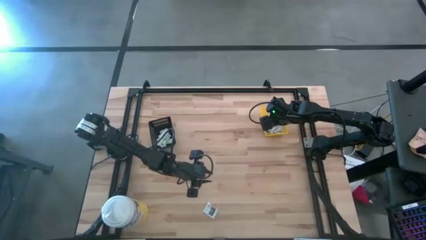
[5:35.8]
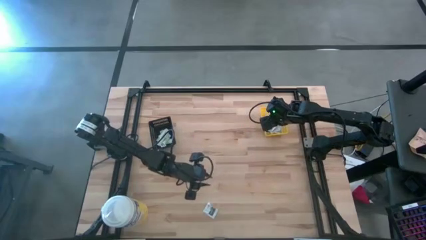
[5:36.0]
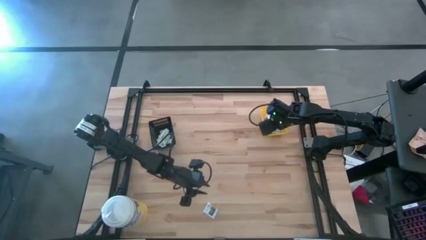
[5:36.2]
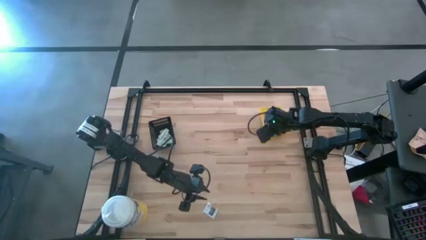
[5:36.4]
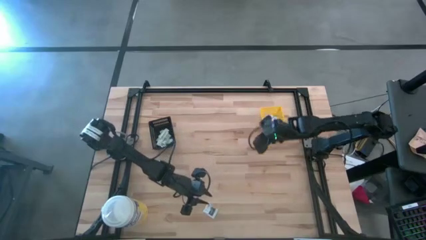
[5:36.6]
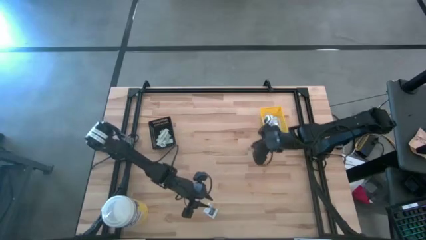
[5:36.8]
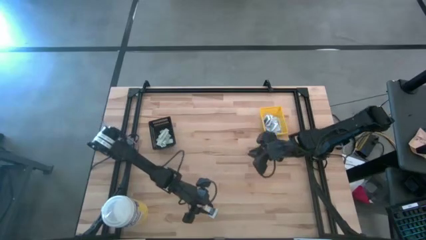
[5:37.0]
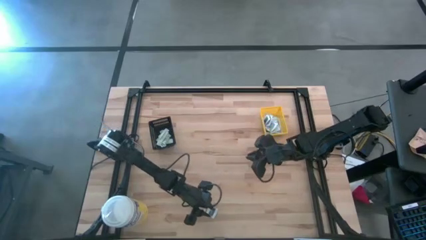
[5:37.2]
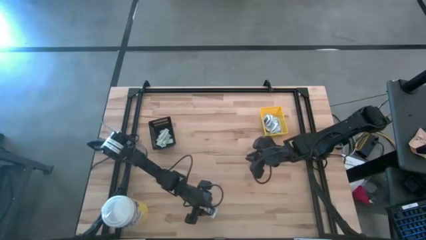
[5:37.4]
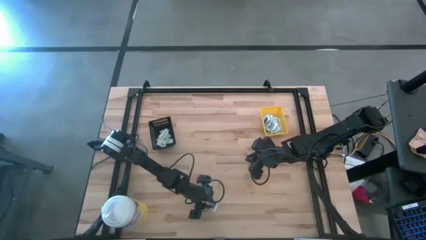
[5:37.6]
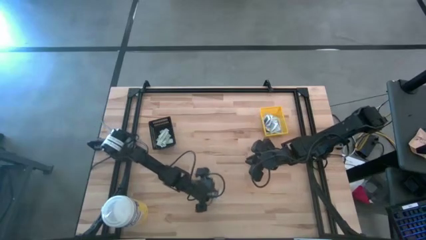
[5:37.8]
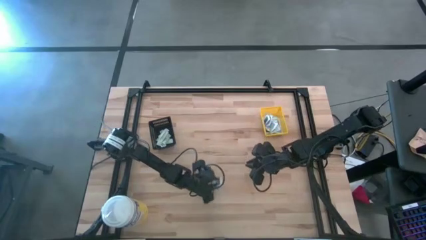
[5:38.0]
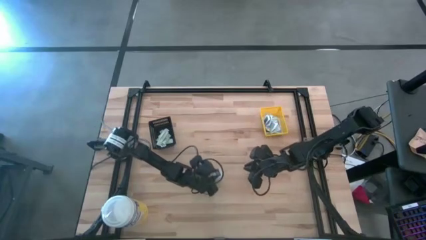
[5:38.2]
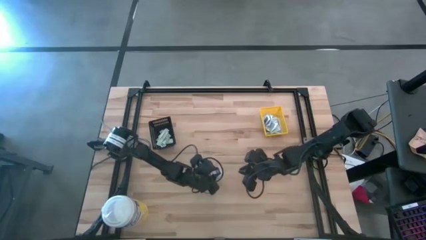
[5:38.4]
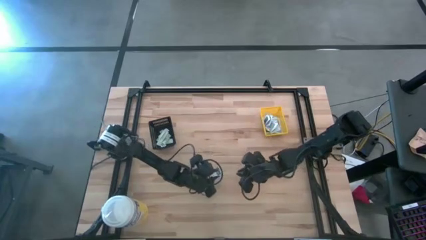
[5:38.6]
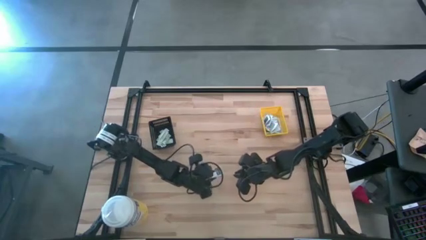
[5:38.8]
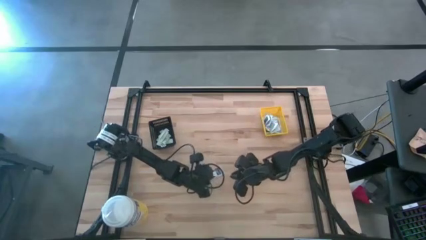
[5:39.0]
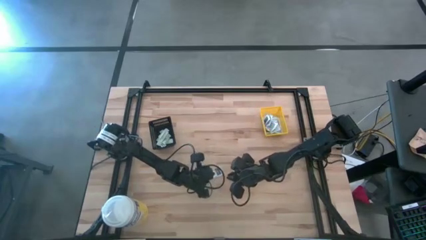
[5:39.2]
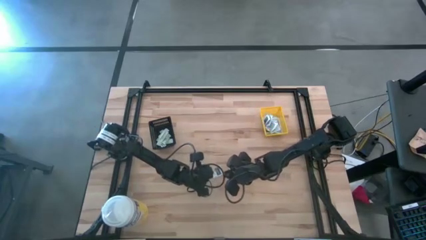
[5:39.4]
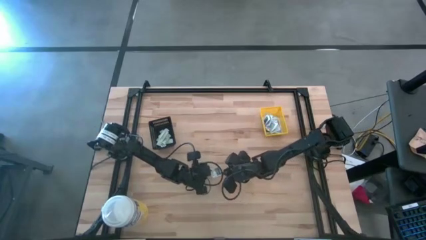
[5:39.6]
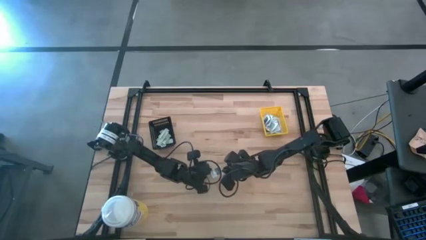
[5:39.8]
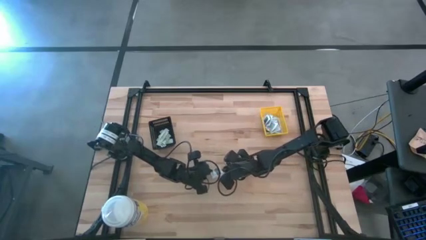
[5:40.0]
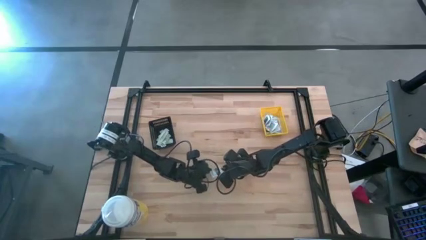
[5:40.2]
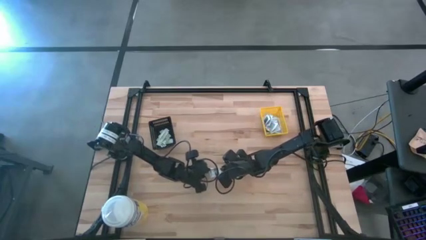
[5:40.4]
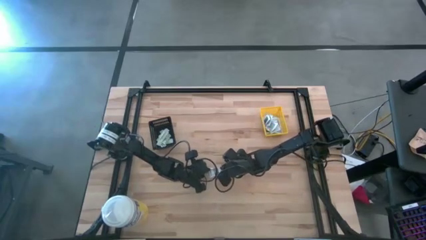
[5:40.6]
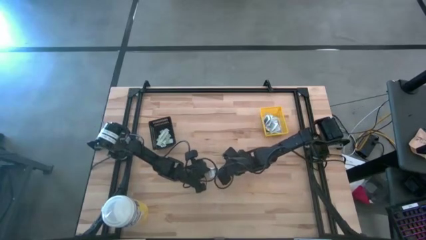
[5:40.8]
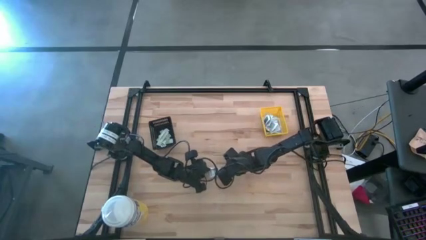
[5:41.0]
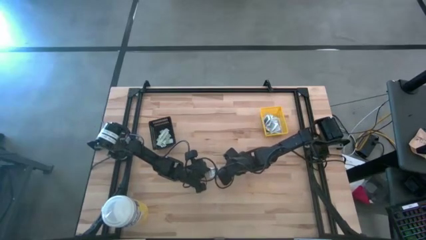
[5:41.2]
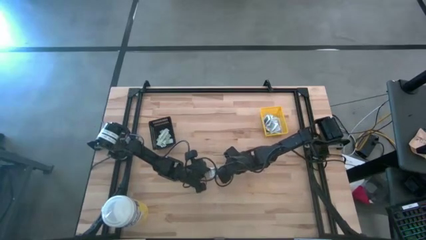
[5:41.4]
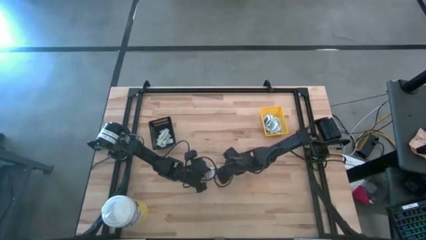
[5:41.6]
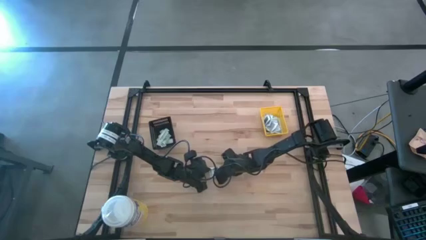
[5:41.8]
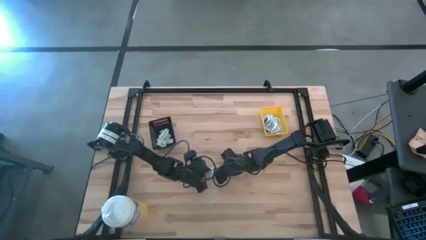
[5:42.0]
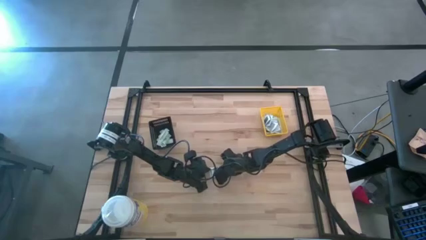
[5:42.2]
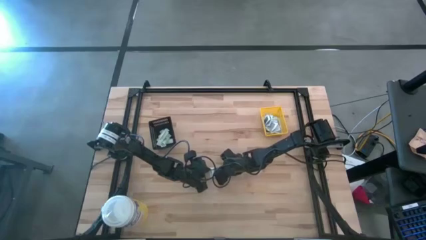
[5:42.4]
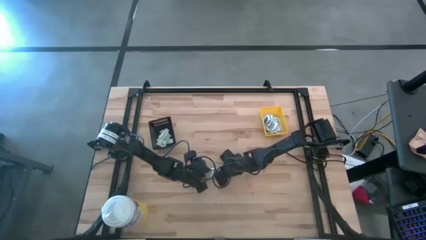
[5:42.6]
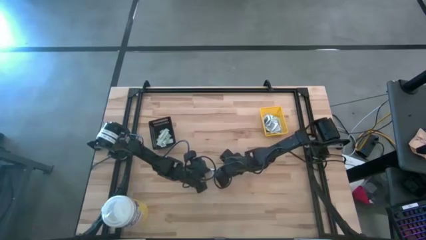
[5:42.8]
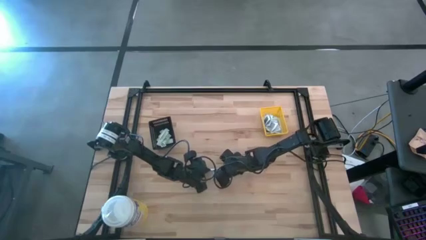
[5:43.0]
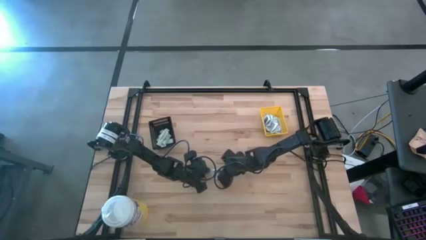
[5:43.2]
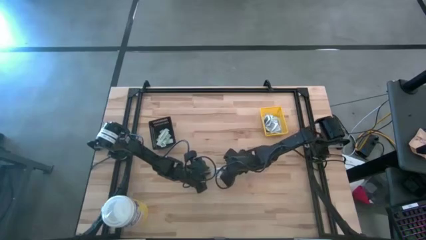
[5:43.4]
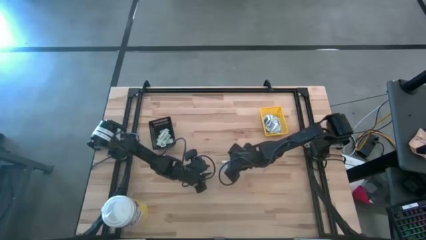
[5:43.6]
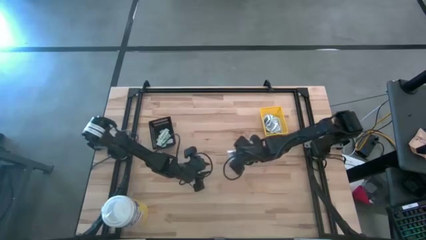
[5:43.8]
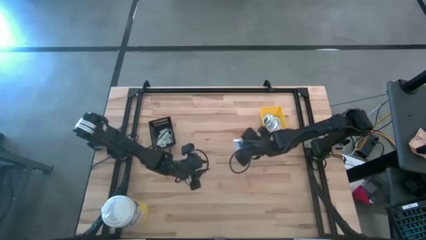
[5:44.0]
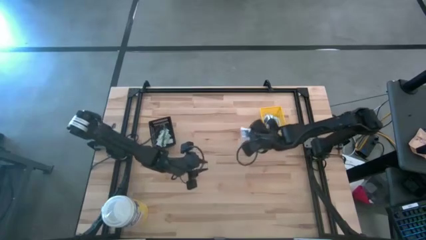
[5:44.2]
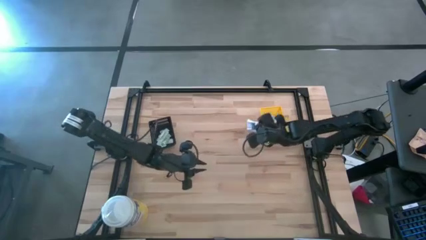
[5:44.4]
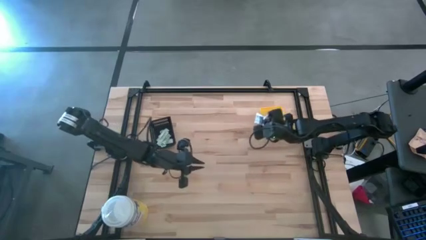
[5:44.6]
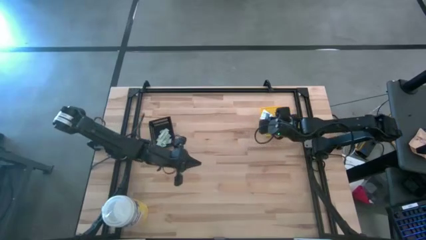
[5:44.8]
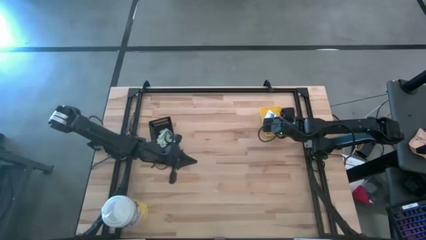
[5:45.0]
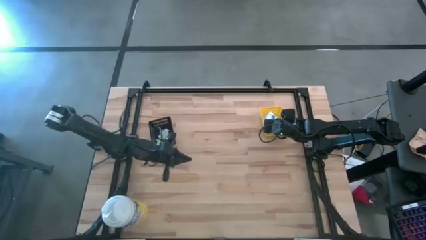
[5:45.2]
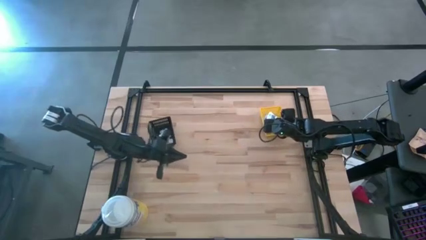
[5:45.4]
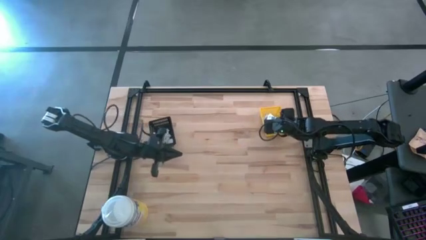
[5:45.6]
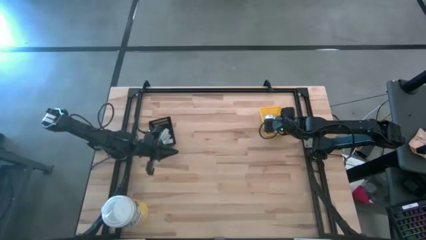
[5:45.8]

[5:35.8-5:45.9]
Task: Pick & Place First Aid Supplies
Put the black pad into the yellow bin
